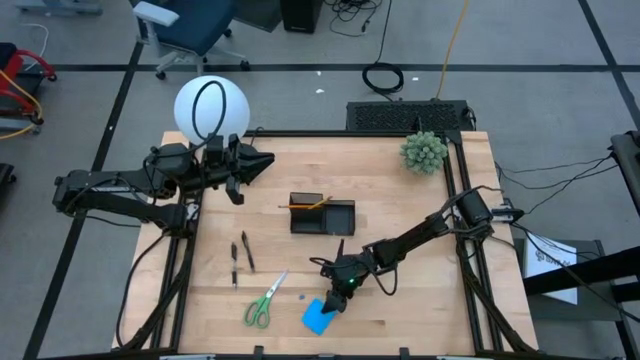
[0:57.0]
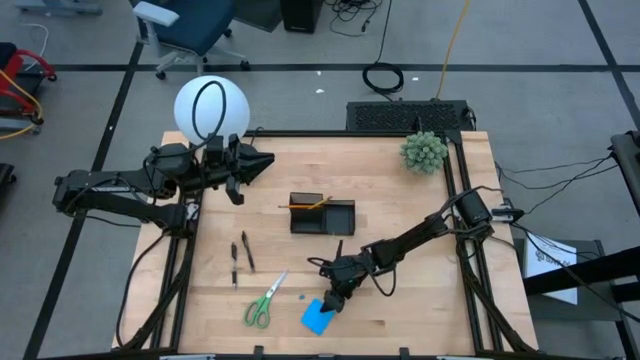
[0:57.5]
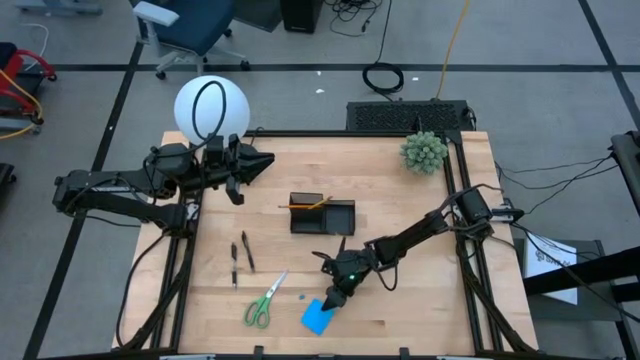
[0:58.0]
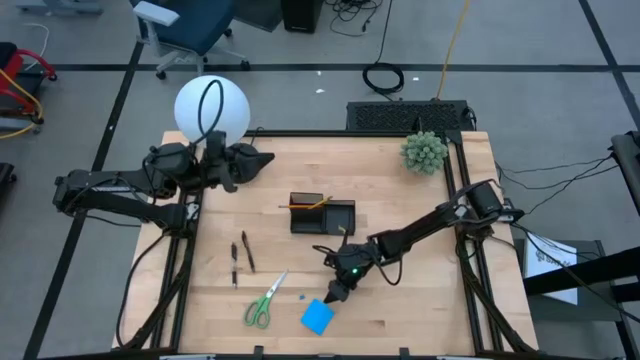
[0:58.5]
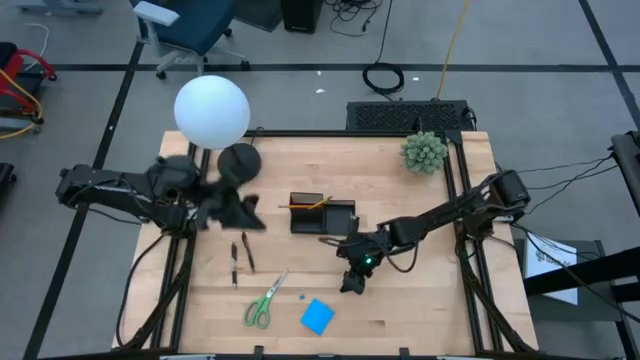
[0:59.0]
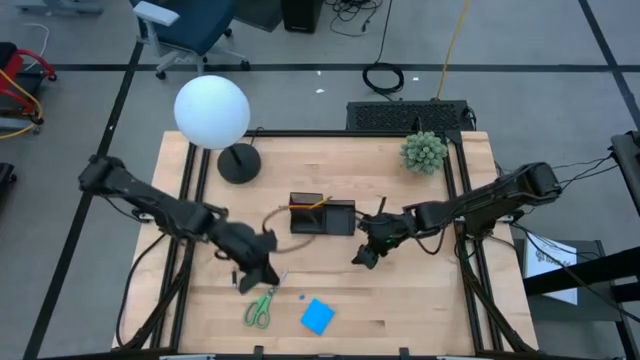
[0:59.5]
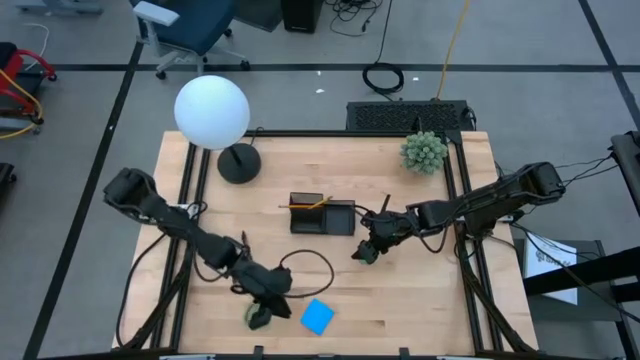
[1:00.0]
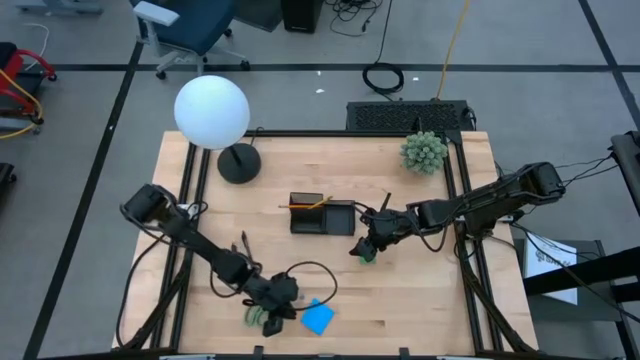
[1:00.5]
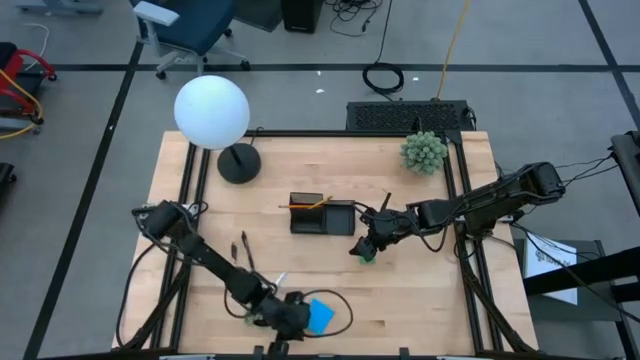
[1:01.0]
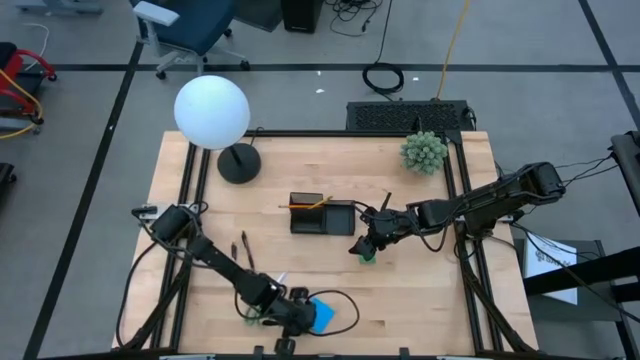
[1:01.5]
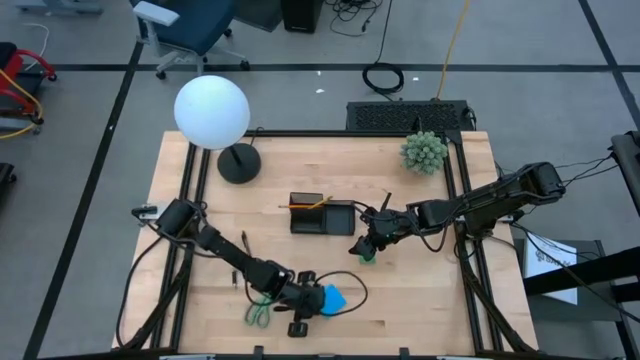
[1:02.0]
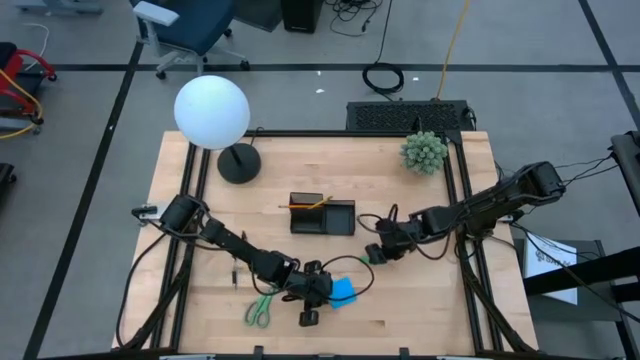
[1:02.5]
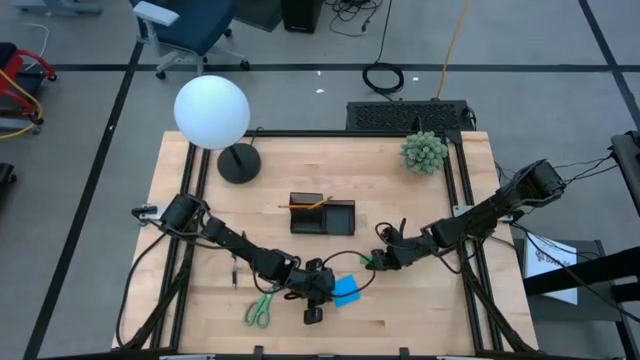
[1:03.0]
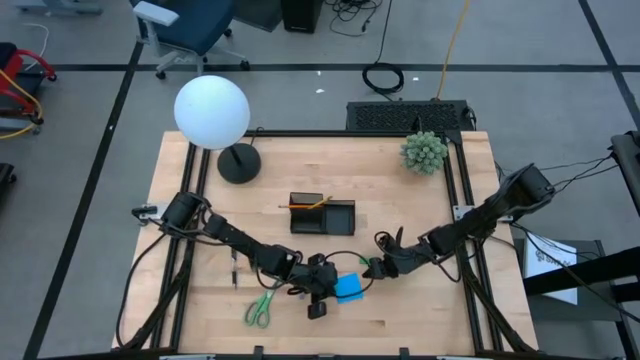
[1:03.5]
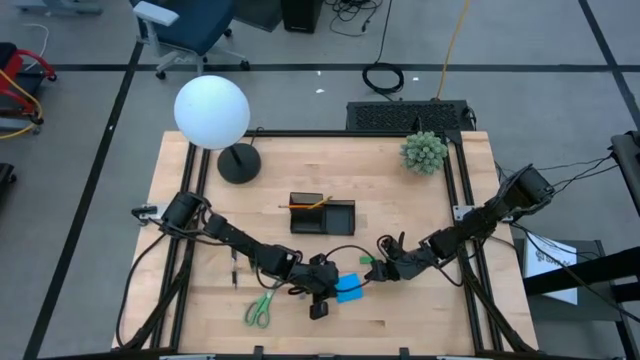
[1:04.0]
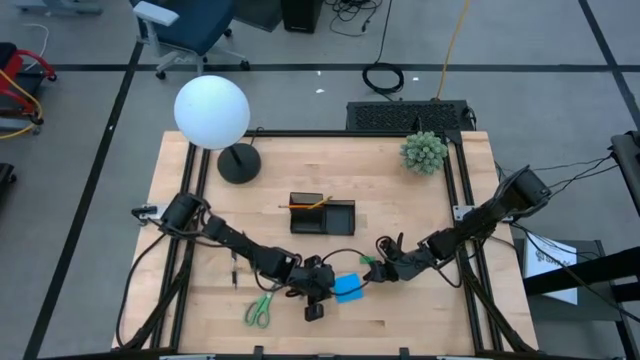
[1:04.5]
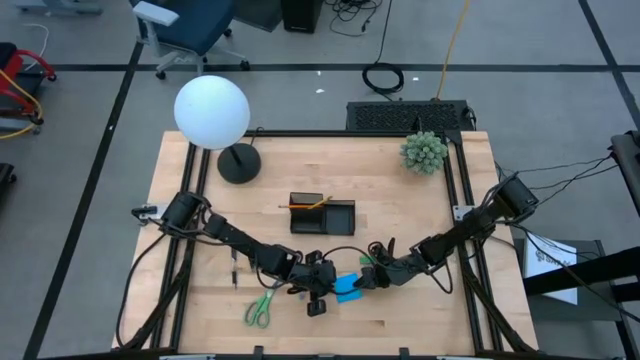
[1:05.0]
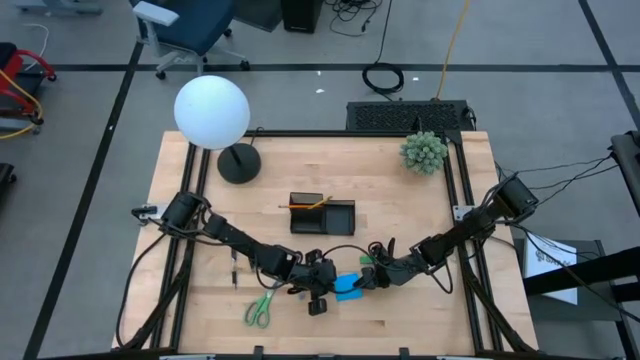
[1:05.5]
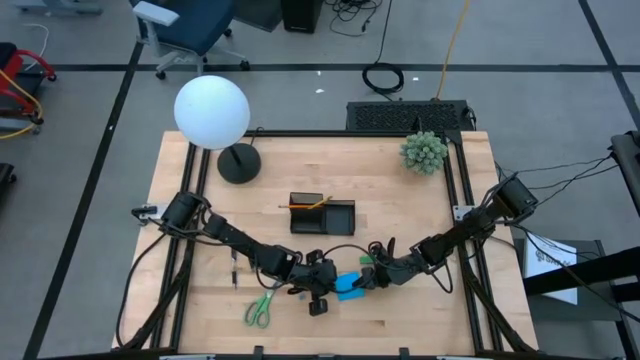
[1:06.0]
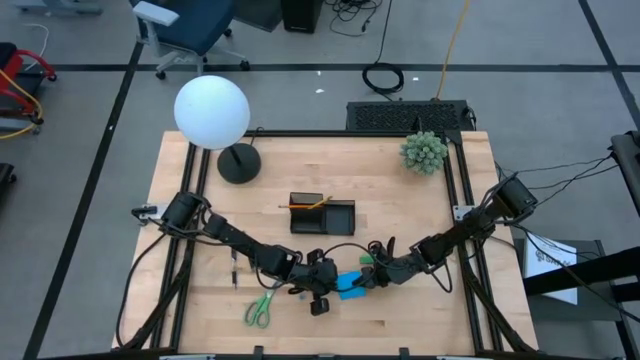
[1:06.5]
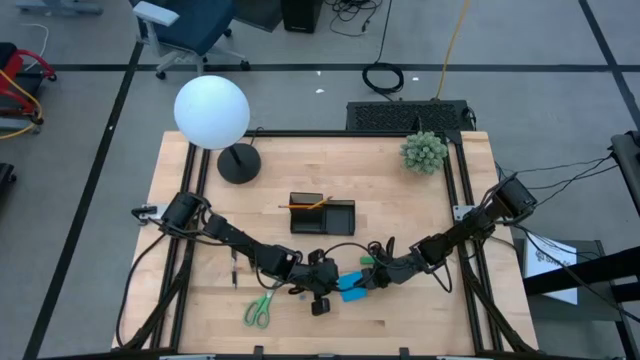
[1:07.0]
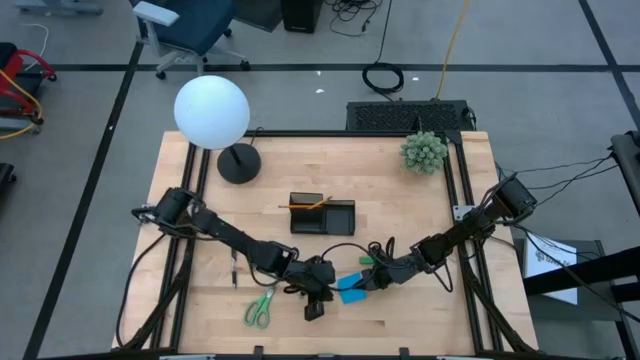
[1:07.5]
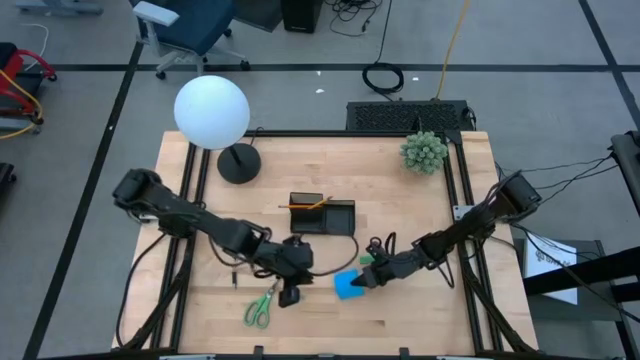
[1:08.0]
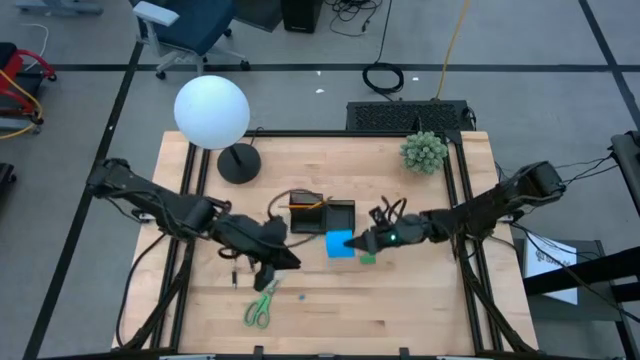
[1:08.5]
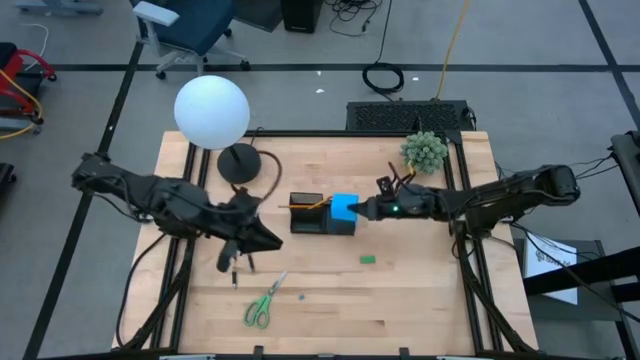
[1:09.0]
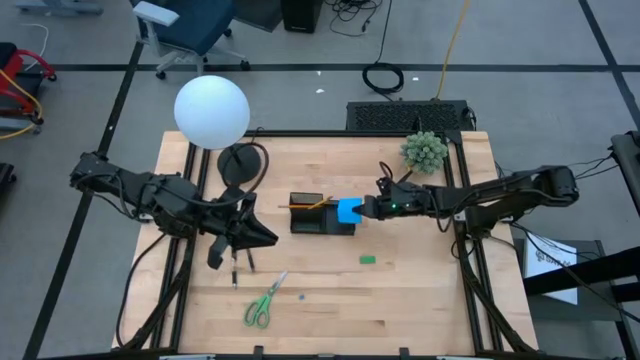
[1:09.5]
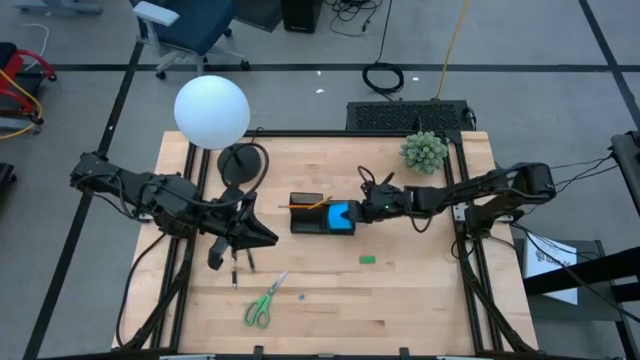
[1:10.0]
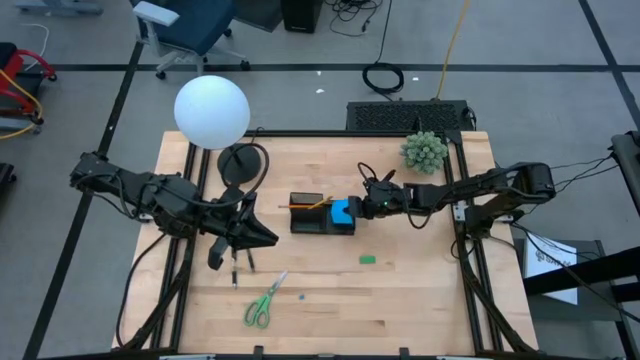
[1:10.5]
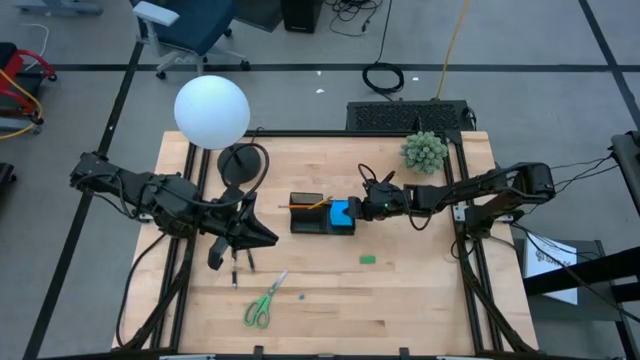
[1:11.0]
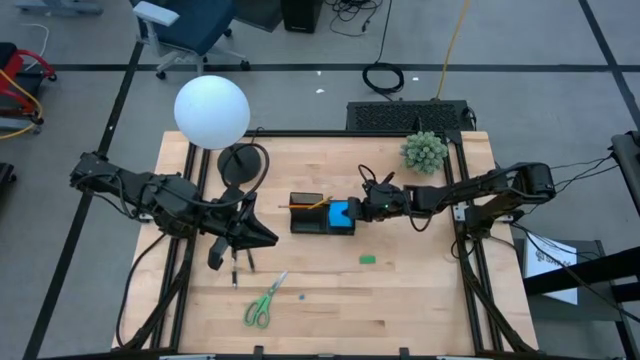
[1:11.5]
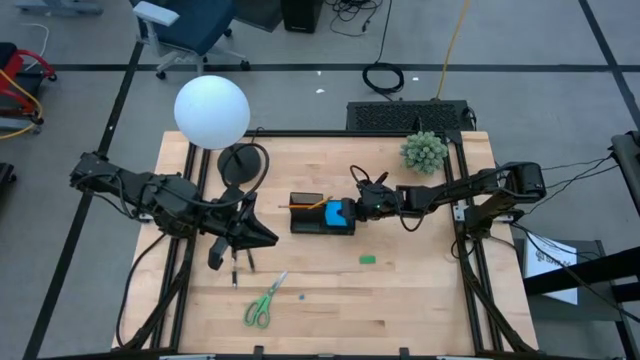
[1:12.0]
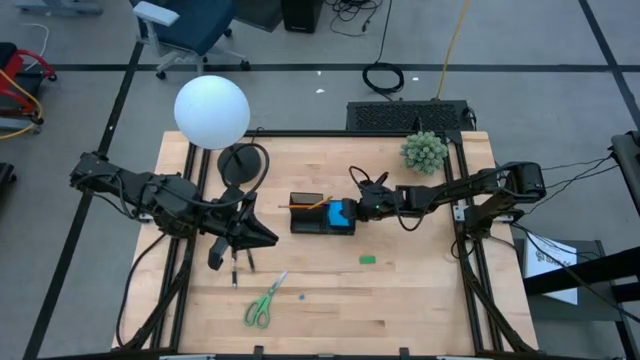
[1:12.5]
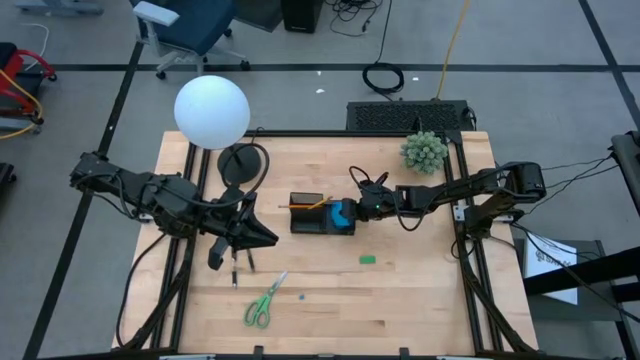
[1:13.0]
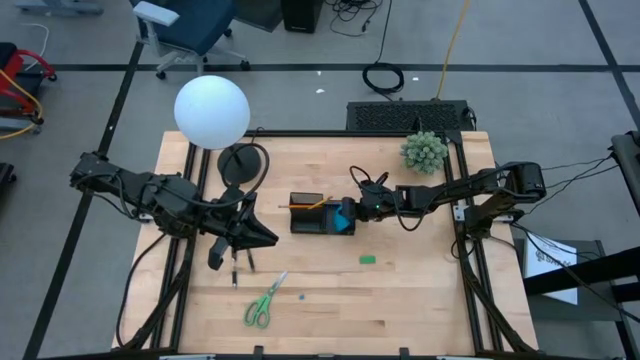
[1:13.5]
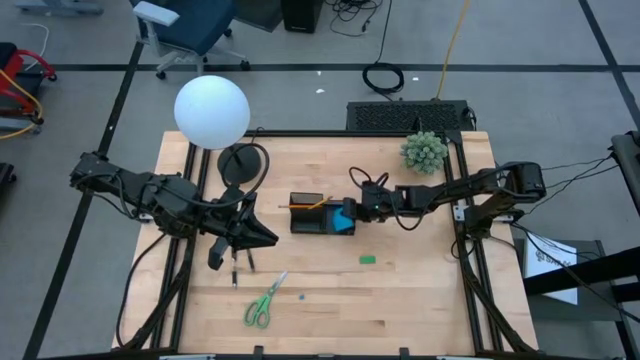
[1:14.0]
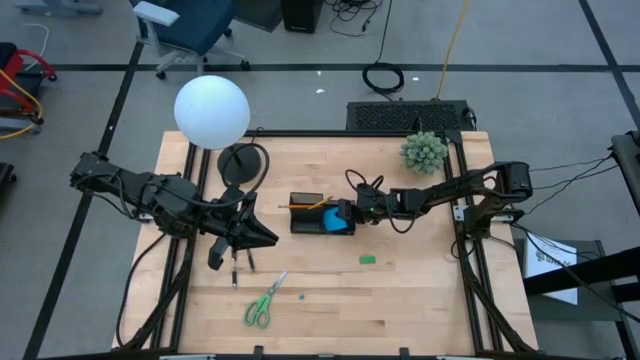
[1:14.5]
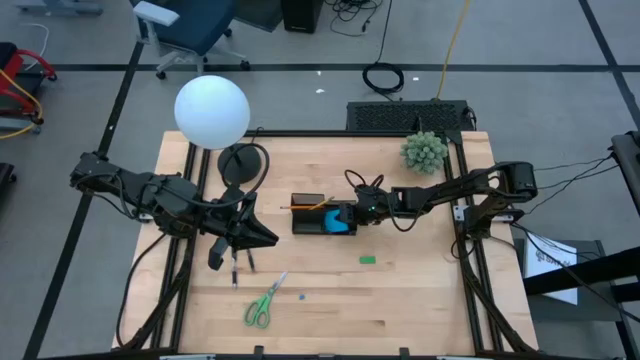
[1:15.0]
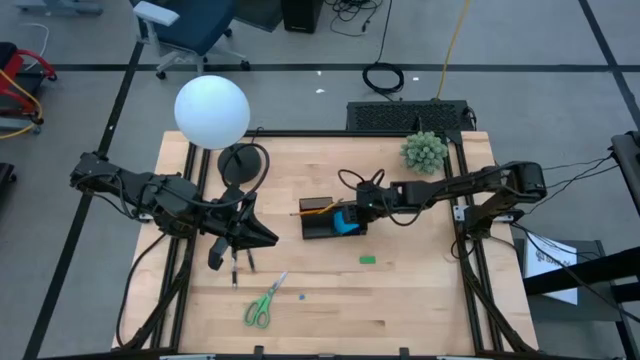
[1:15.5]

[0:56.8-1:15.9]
Task: Pick and place office supplies into organizer
Put the blue sticky note into the desk organizer

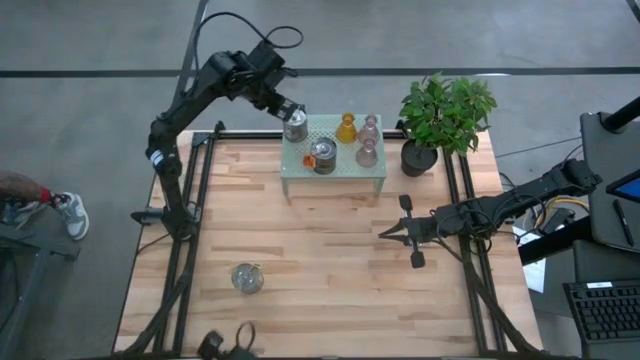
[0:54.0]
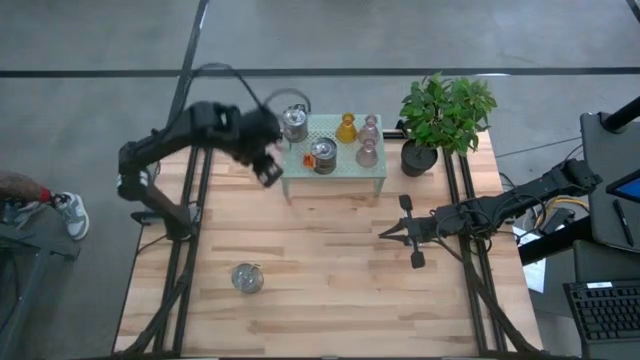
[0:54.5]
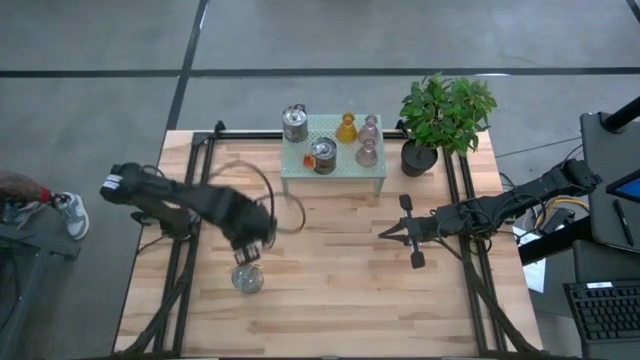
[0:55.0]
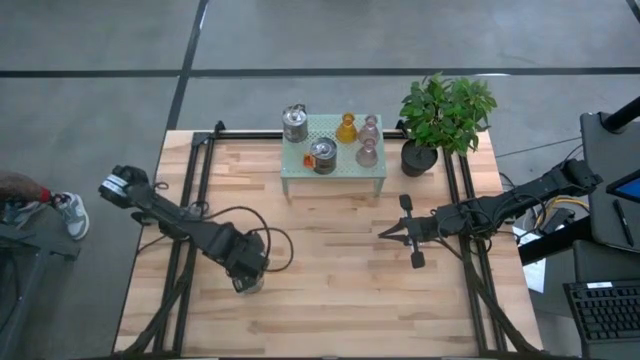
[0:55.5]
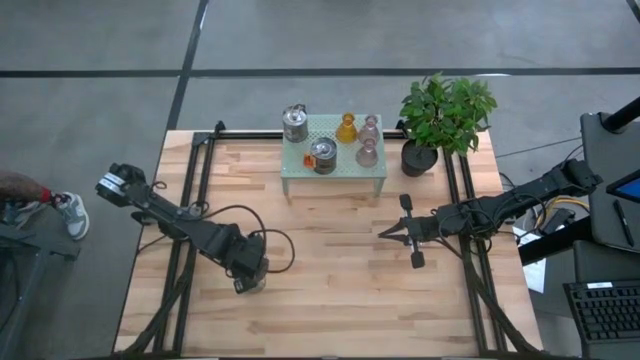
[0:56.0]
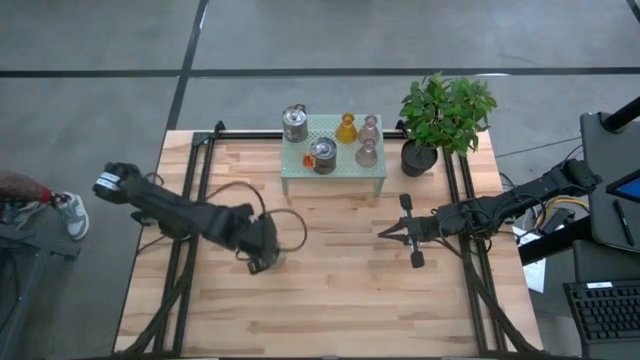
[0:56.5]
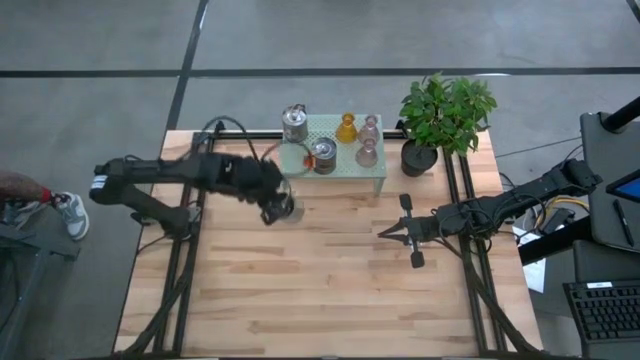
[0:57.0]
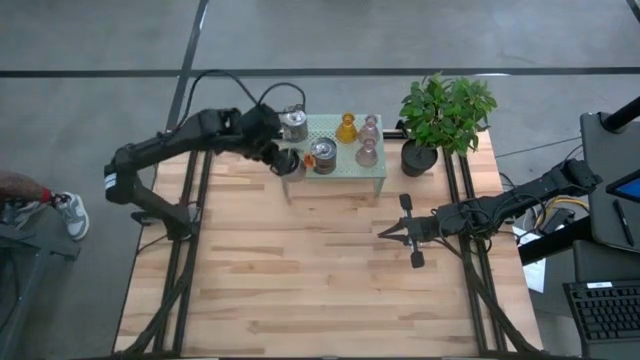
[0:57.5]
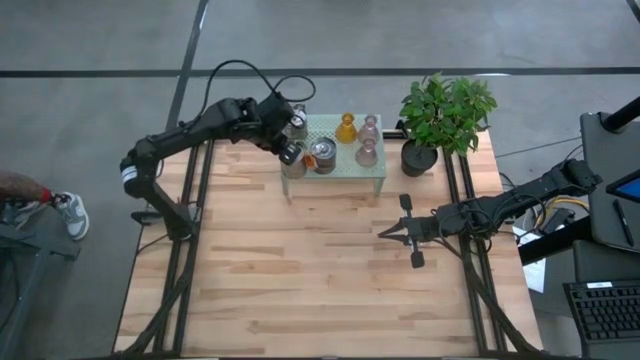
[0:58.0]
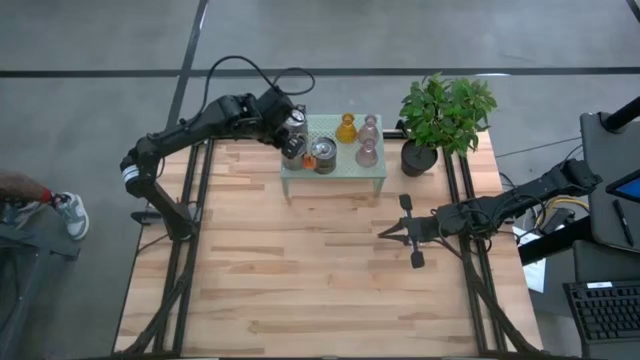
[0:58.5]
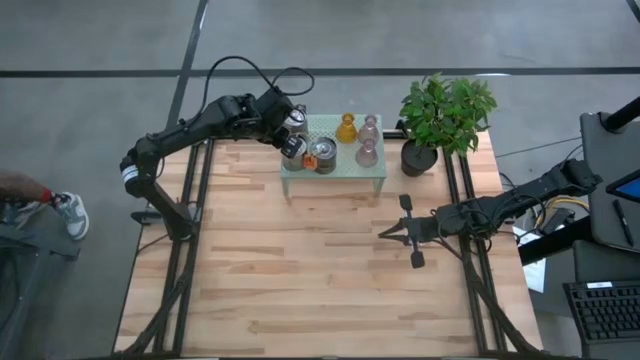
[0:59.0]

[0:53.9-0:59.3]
Task: Pick & Place candle stick holders
Put the scented candle can on the shelf
